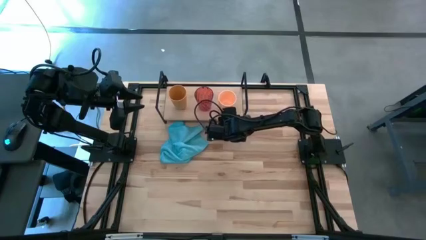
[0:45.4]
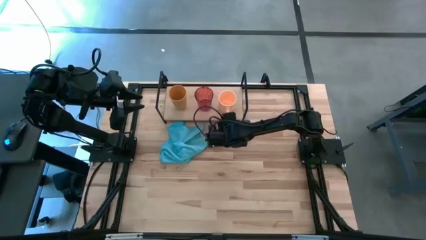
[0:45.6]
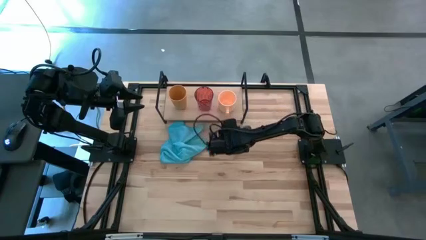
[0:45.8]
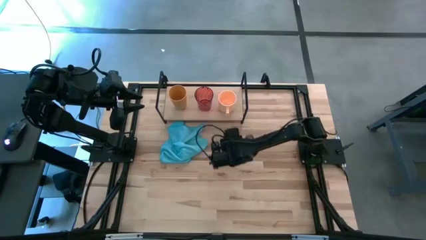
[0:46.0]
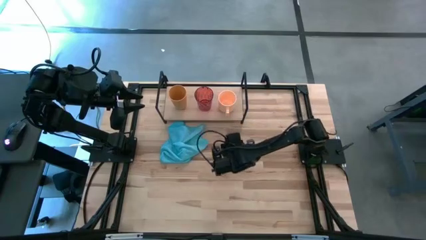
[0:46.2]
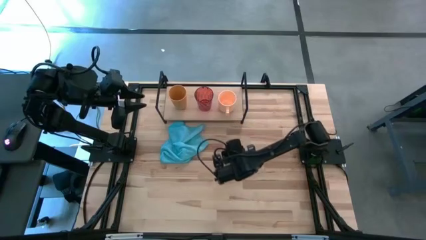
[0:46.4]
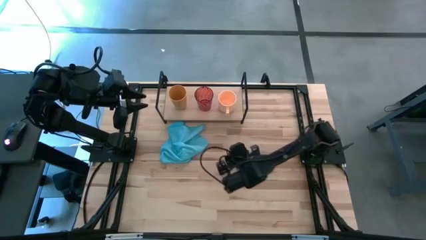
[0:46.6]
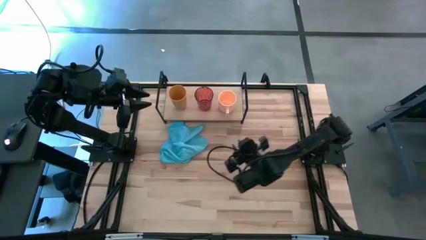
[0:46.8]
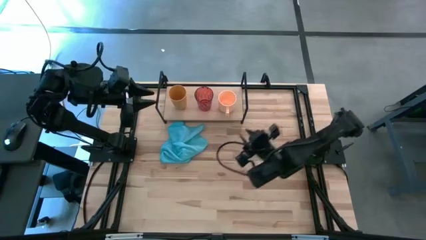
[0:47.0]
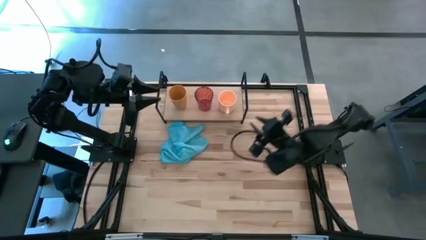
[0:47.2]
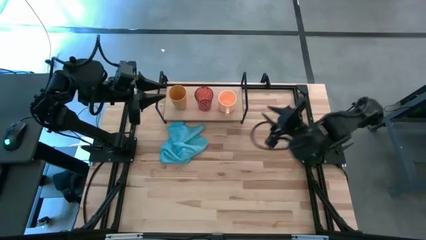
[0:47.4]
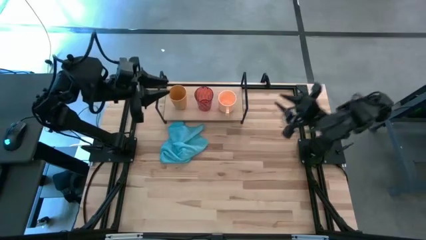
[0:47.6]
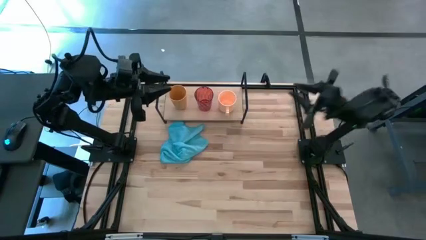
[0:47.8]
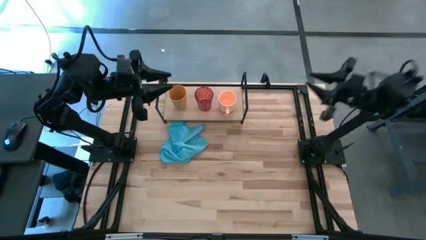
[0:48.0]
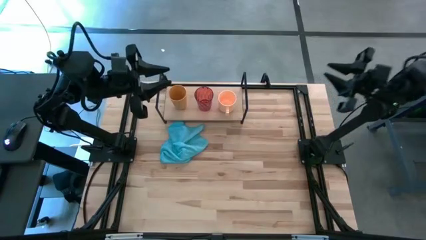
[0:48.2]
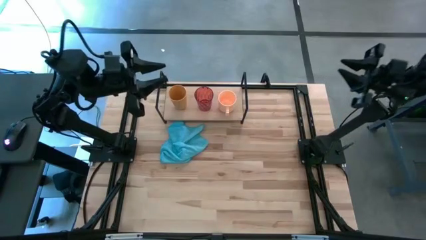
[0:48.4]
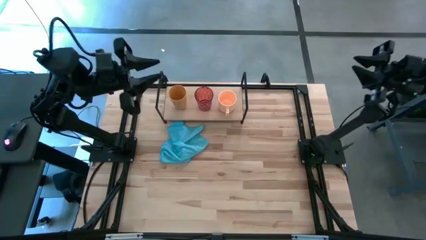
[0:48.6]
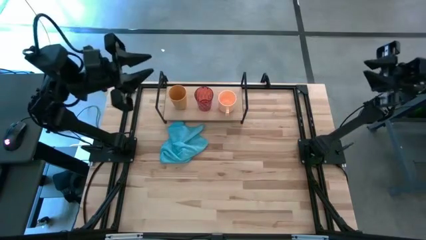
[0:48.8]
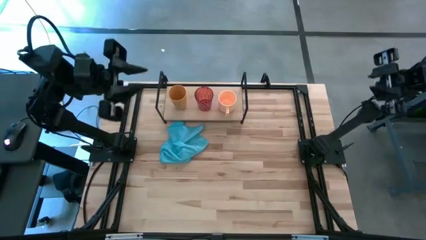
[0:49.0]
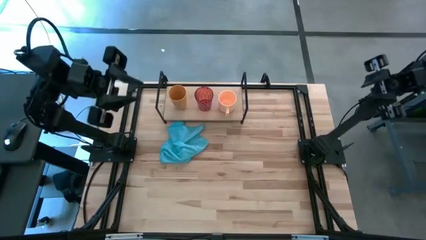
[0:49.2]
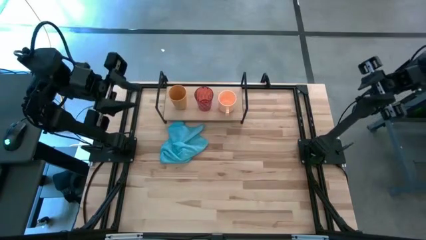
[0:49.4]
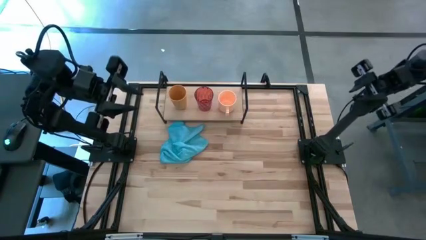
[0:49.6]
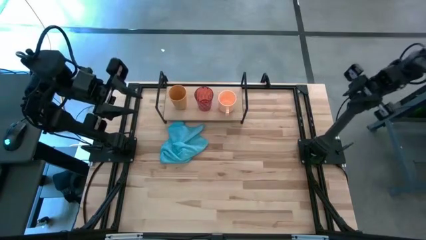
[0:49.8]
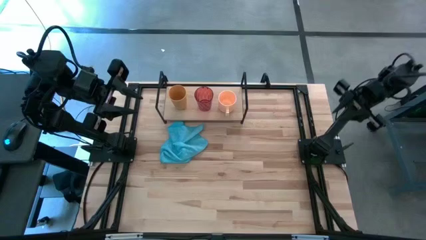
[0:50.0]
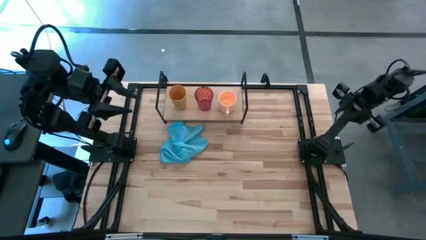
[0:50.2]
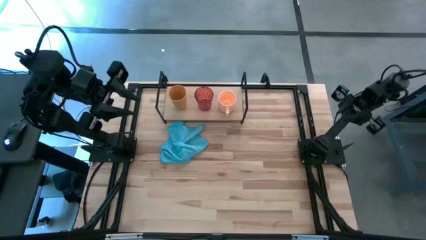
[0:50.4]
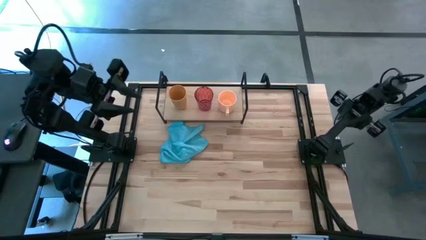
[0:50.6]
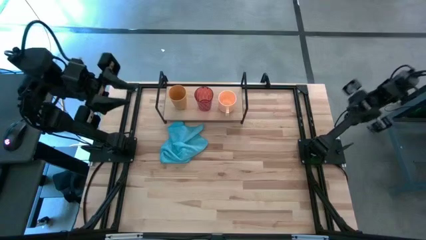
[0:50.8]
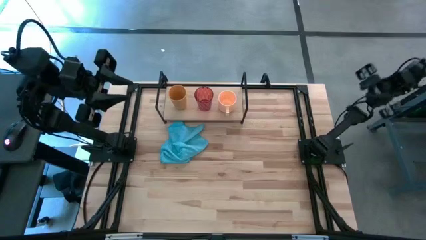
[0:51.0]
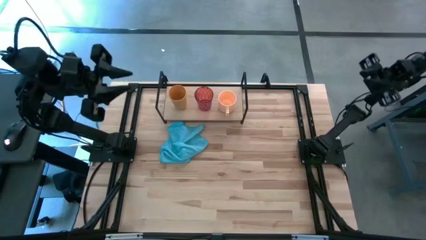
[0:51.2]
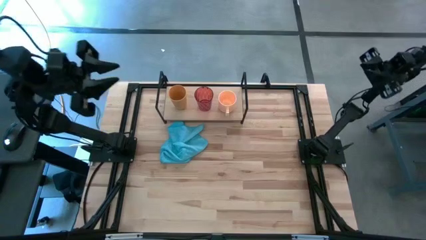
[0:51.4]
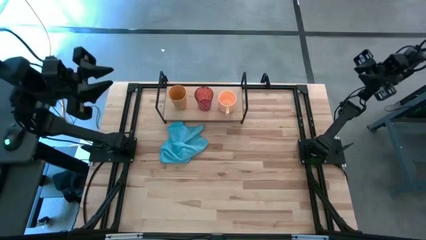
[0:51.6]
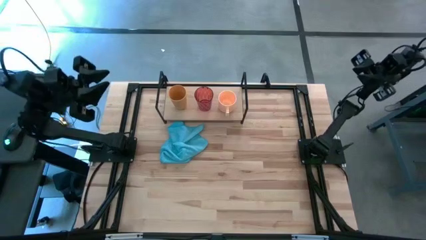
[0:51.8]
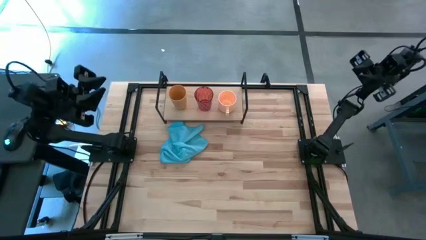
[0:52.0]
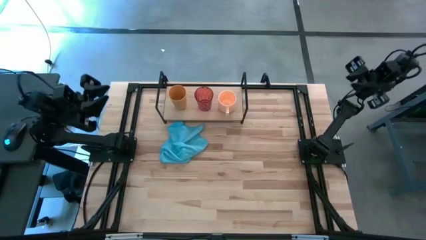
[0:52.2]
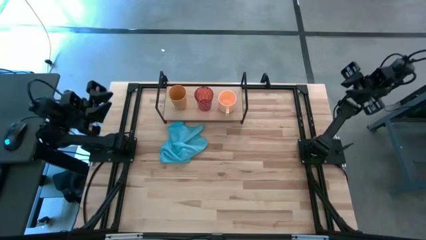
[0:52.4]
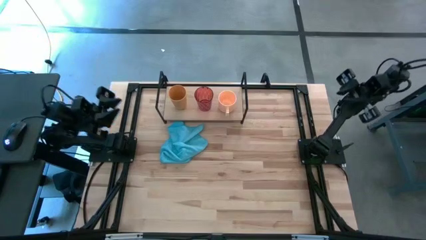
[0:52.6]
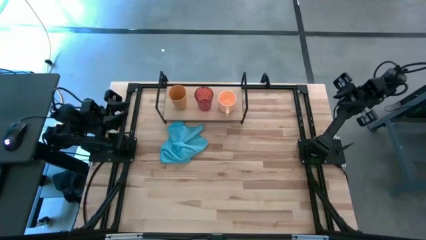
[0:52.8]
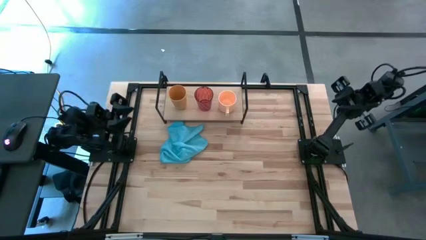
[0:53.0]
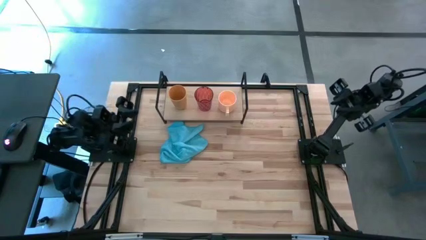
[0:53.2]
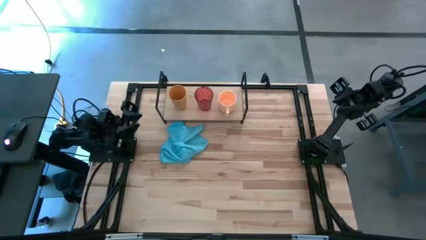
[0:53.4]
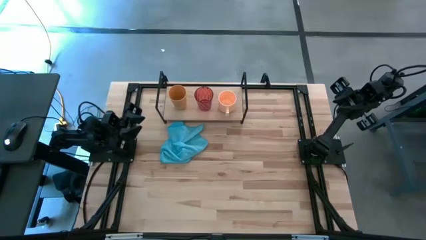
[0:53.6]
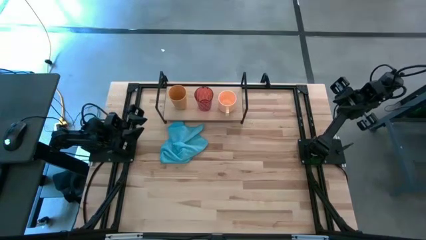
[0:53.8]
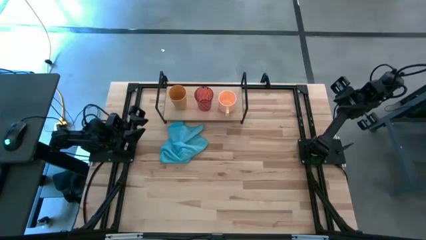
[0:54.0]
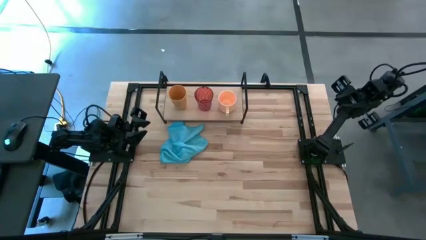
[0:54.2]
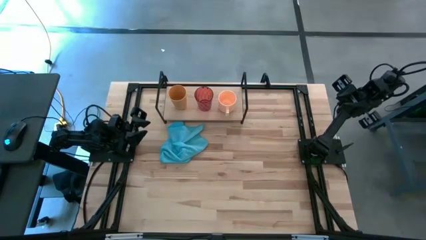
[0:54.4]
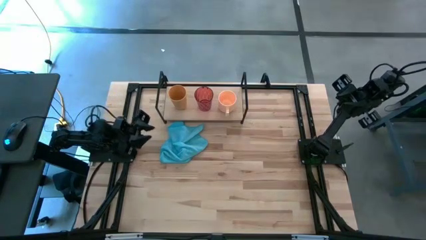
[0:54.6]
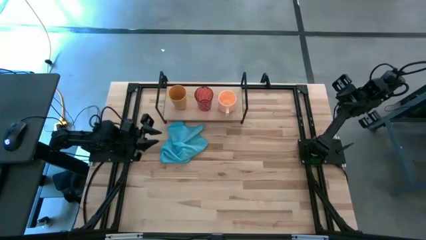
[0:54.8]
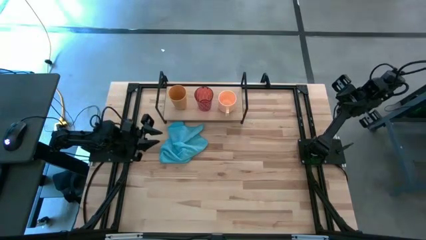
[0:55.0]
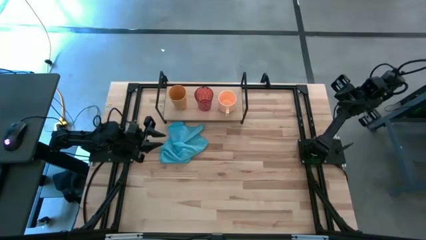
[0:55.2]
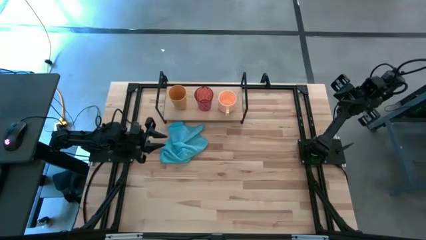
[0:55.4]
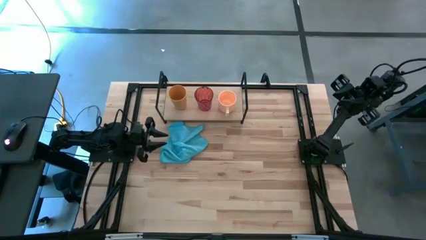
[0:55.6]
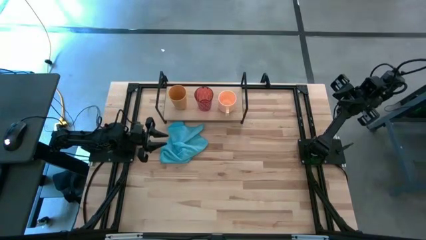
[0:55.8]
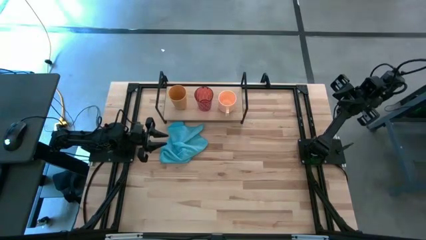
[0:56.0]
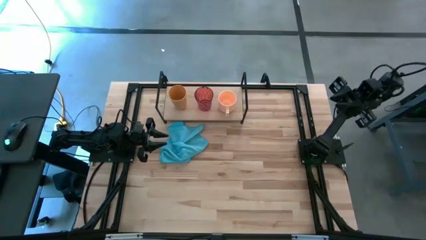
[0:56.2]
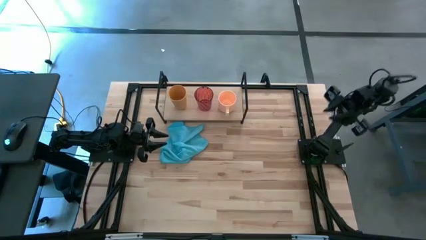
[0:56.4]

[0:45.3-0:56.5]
Task: Stack small to large cups/mugs on shelf
Return to Home Position
